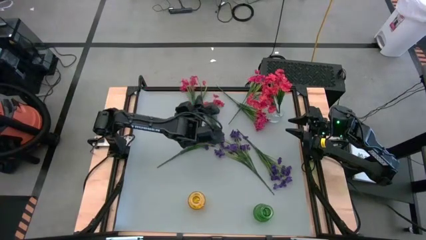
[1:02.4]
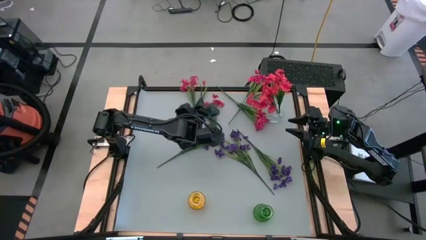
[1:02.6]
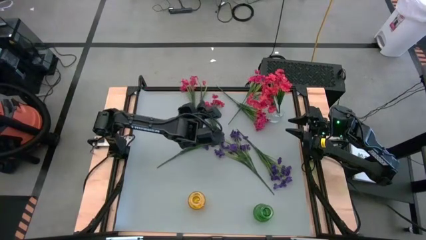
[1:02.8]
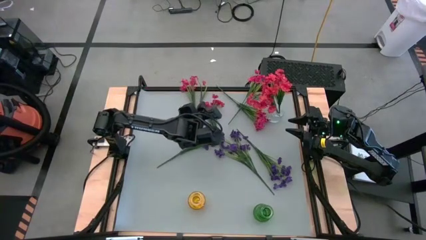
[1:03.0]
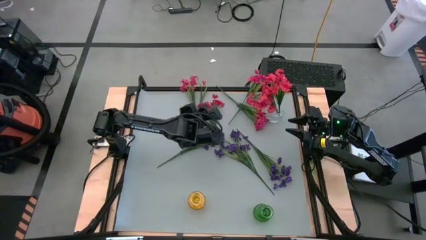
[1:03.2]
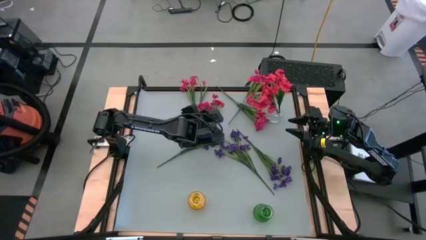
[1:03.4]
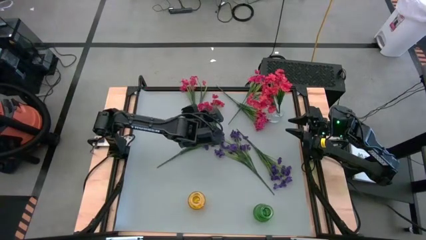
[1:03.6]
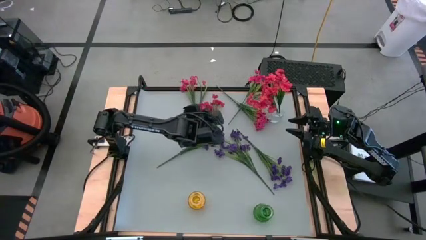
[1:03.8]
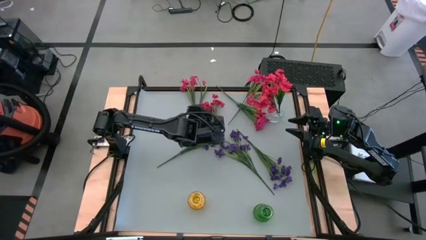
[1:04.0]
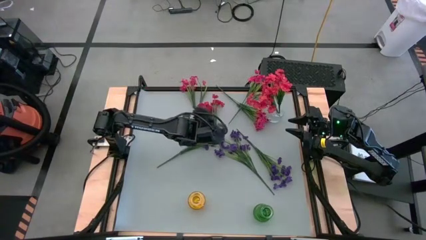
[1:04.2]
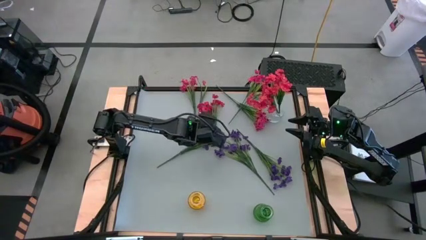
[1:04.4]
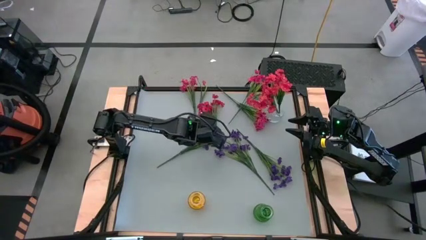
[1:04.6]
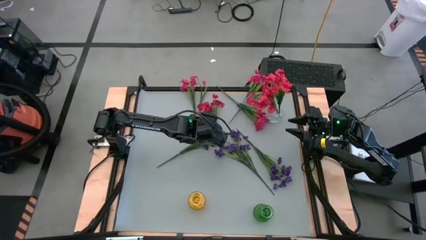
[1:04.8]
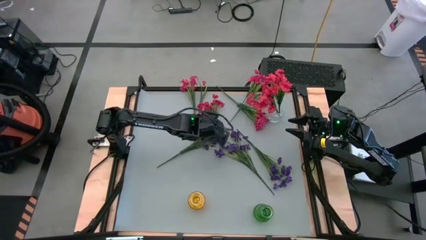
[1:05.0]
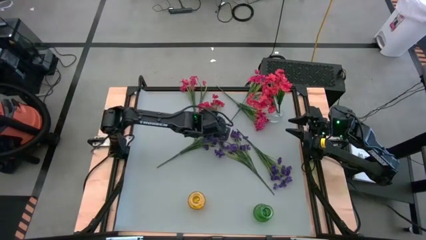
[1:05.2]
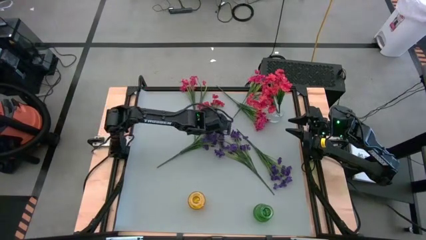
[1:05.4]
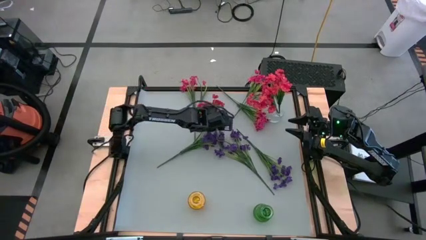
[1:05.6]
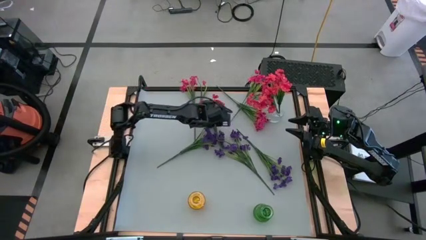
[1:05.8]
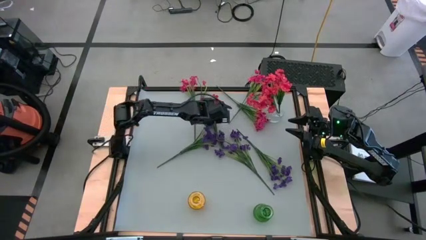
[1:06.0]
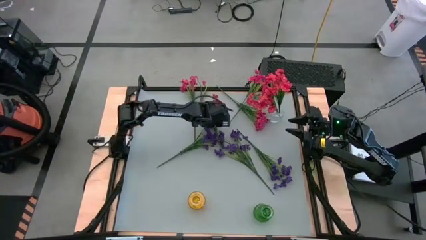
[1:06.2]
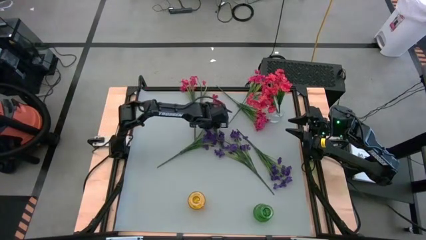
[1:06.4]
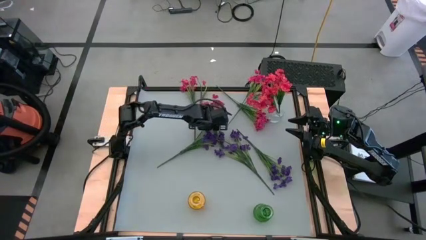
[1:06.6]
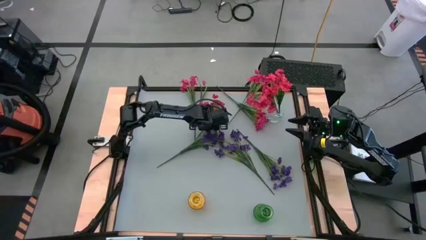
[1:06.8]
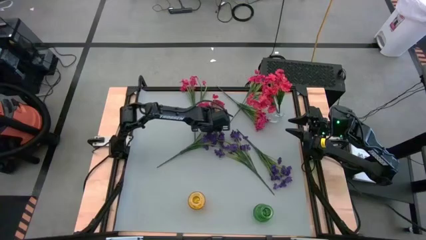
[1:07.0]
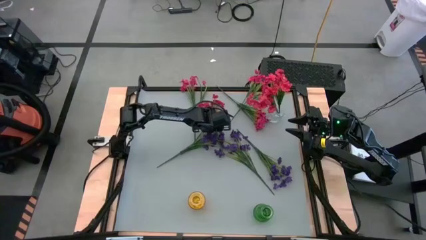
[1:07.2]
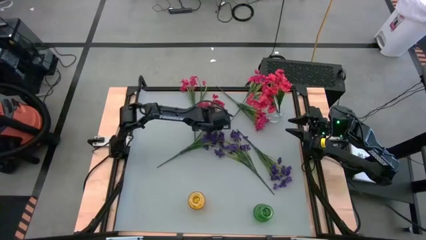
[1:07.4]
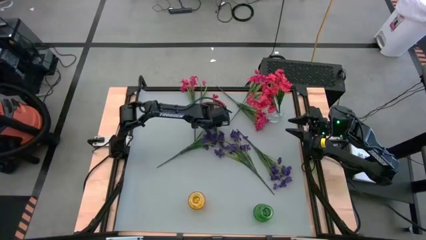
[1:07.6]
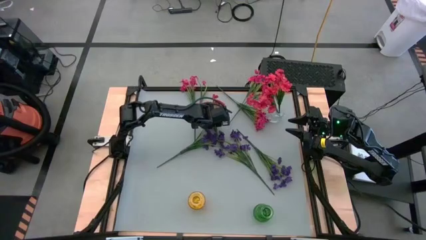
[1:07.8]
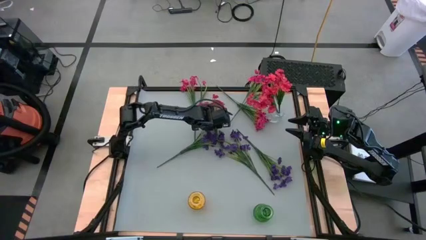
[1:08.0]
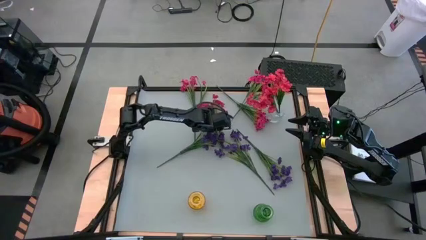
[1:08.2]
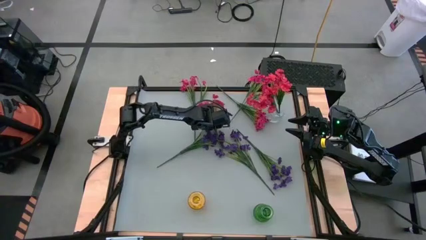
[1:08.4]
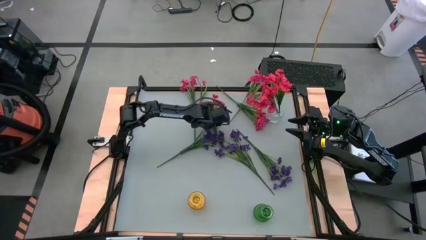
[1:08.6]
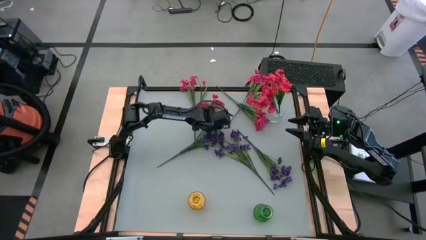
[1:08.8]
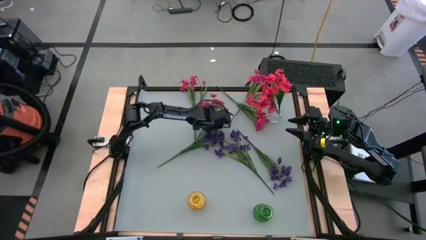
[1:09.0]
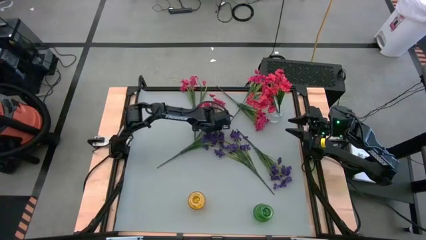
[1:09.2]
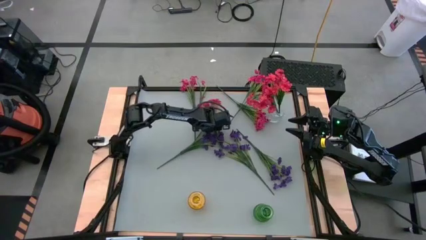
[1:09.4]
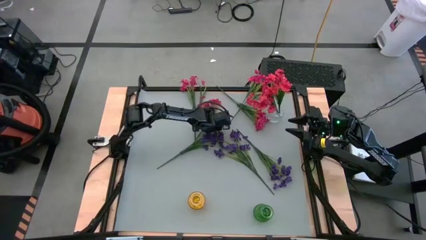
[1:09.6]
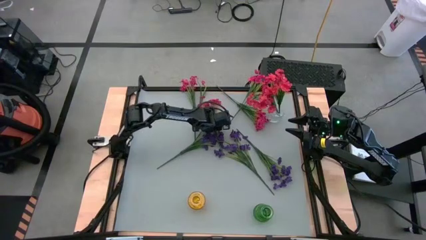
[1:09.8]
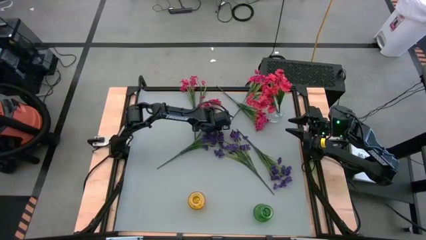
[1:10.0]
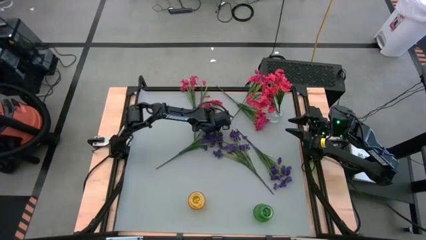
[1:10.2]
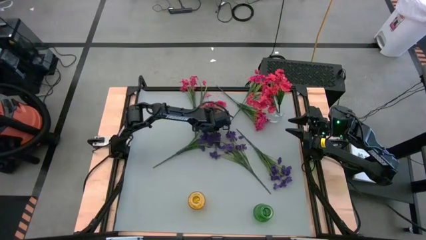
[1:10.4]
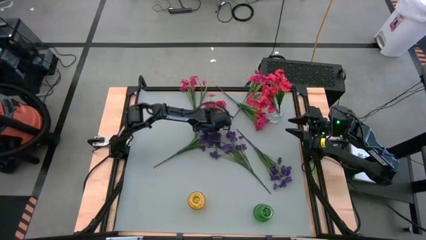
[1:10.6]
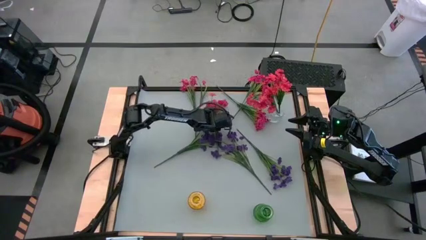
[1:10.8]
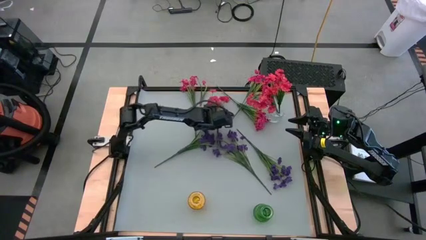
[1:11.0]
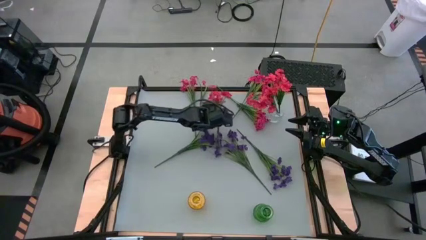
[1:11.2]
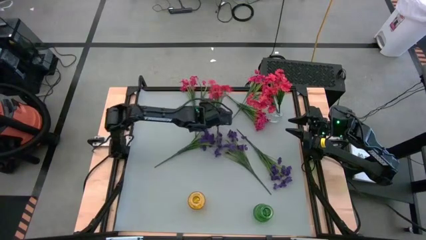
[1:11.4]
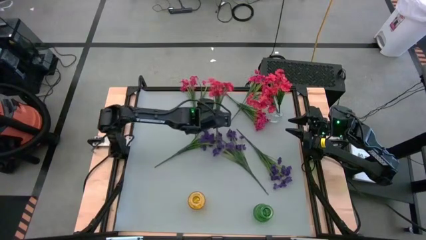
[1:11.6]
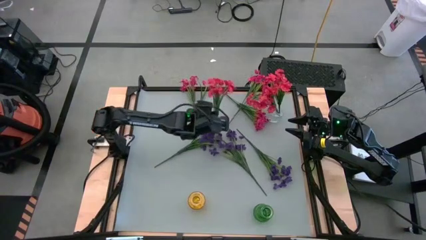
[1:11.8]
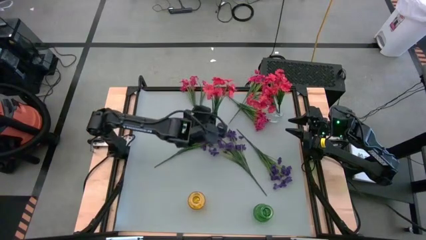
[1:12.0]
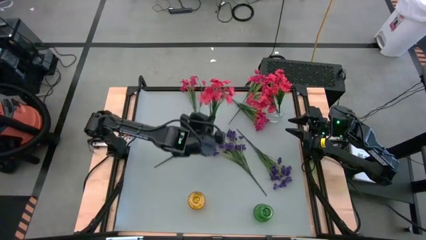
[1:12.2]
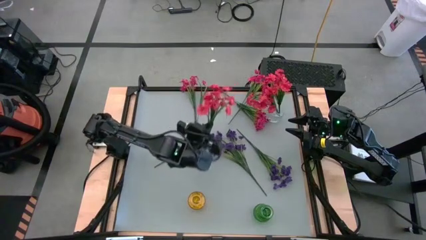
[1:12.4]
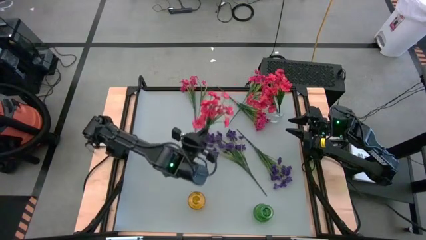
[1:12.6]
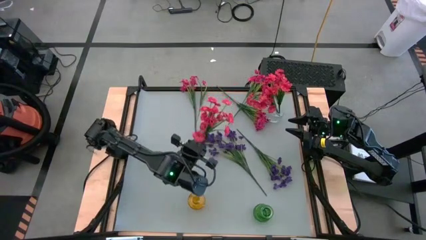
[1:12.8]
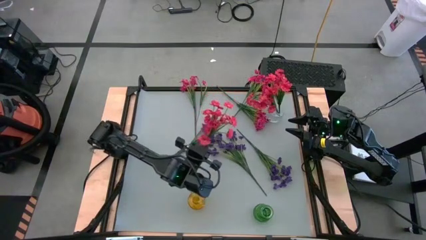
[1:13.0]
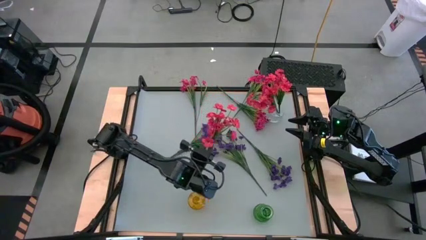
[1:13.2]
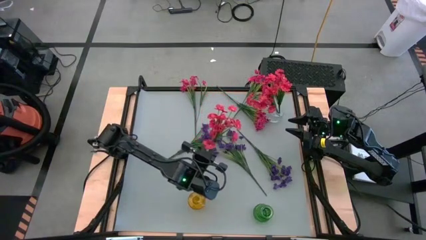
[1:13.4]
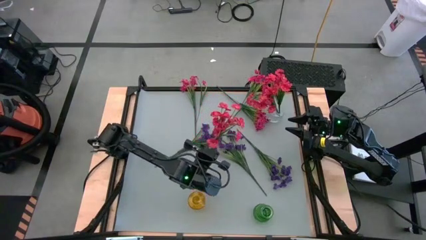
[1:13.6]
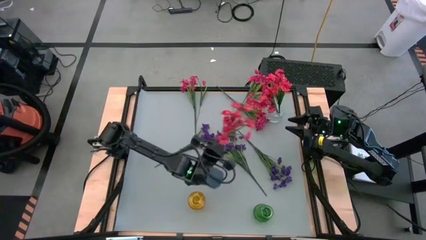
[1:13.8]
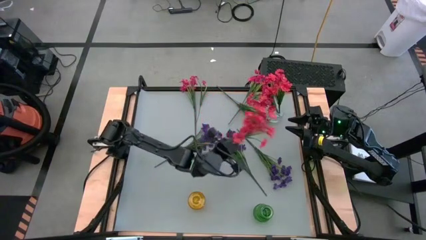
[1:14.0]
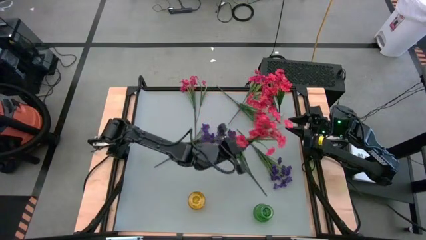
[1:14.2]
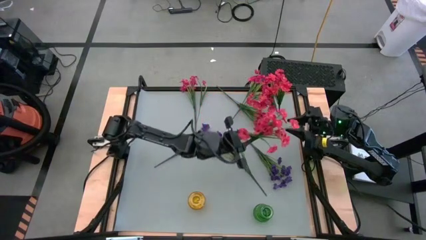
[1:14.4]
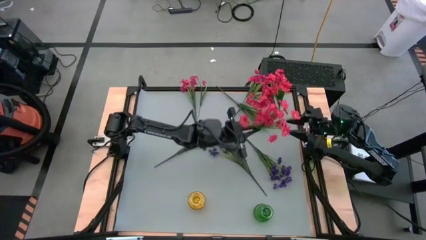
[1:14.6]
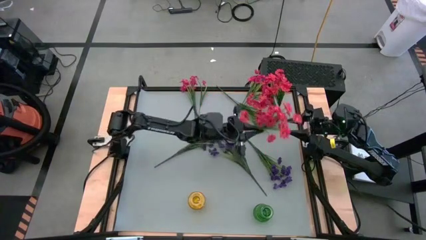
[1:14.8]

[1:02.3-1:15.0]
Task: Sort flowers into vase by color
Put the red flower into the transparent vase

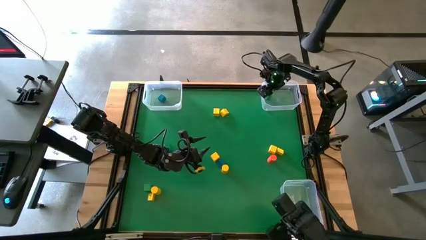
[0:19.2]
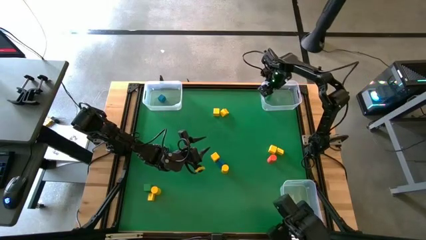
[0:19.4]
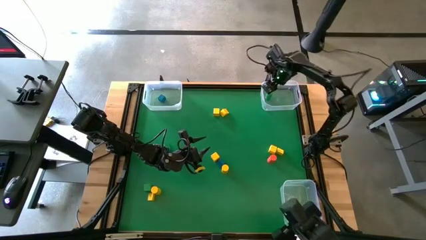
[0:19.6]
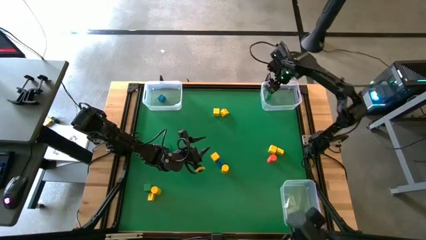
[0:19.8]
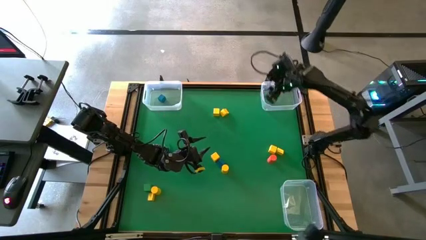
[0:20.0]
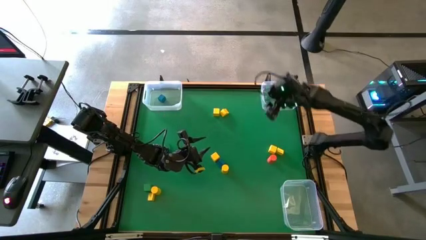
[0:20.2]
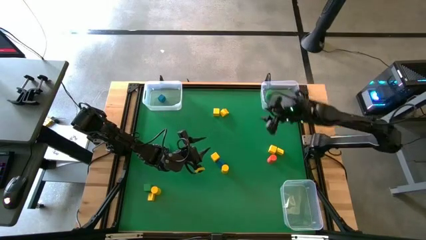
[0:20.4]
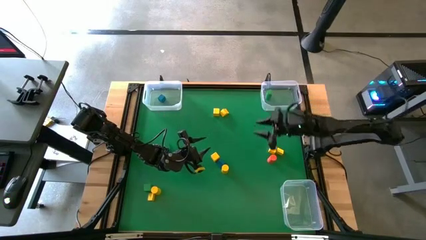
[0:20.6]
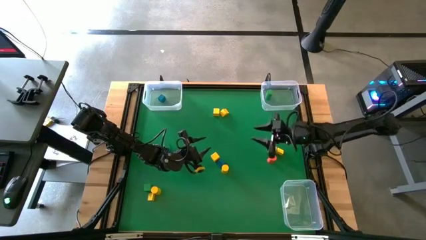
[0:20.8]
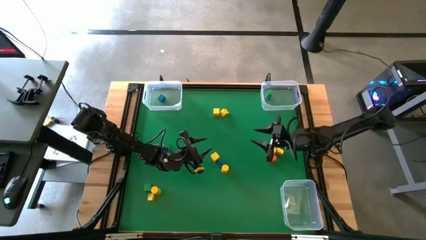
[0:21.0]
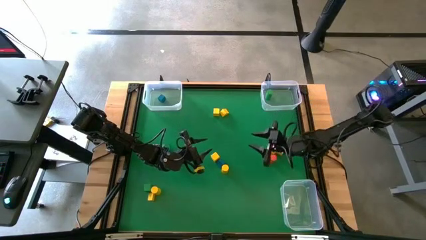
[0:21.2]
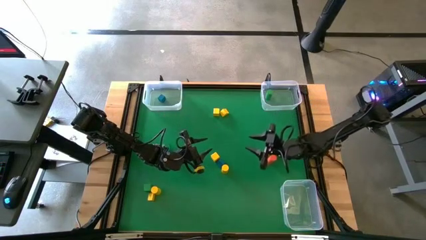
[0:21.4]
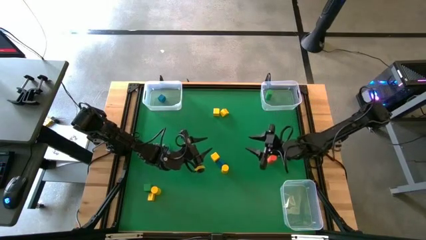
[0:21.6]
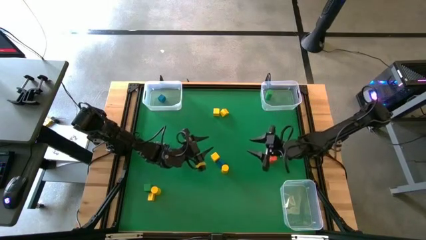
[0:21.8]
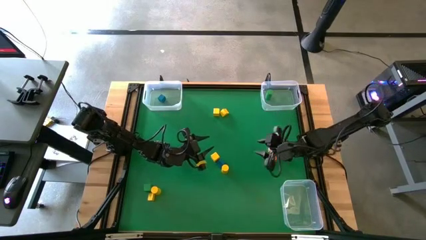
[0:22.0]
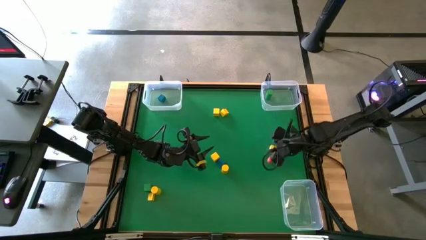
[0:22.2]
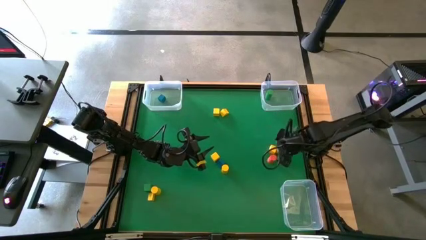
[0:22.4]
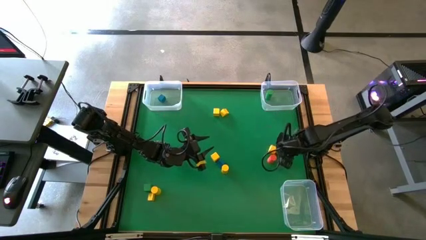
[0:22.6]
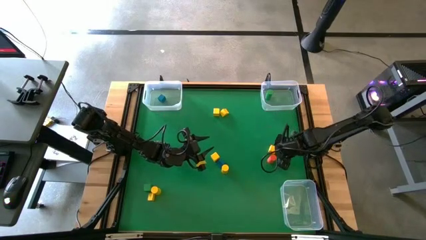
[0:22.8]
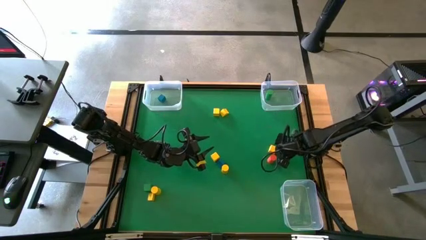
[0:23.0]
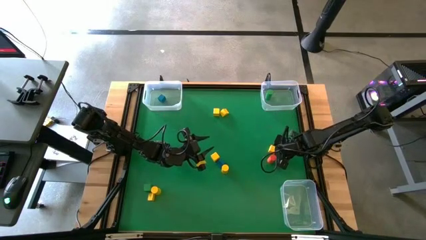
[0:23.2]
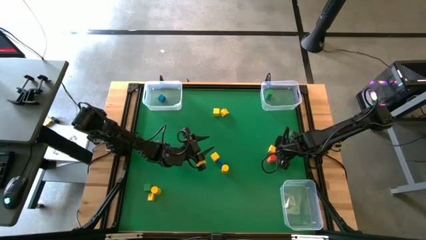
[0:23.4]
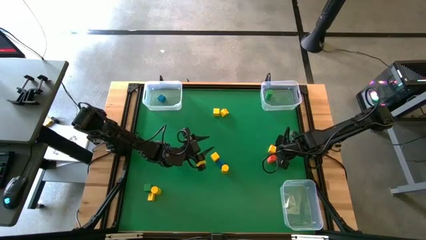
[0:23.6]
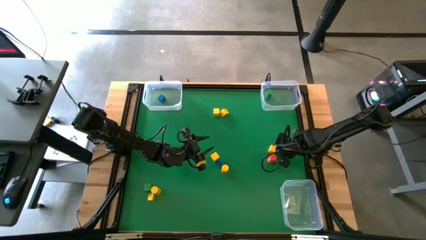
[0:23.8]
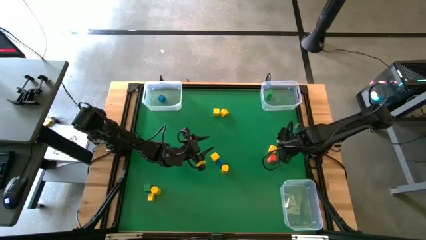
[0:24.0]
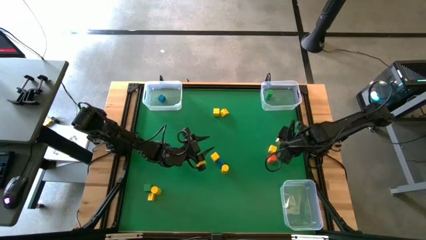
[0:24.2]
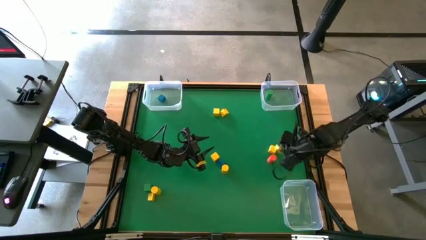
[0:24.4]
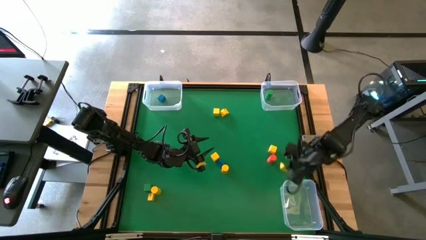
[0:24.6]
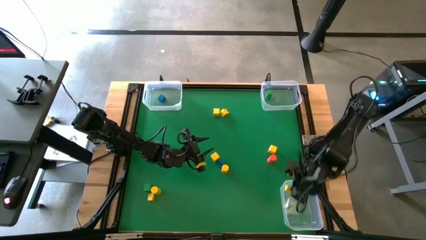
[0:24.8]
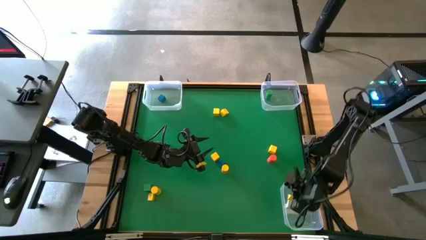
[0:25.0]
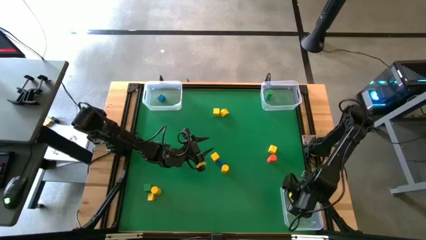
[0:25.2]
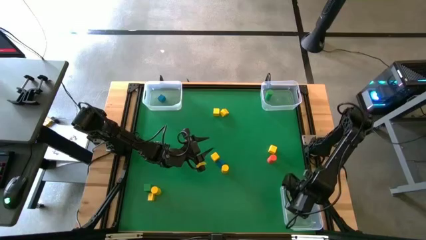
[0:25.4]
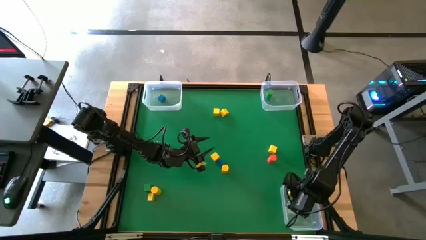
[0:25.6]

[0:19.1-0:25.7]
Task: Sort blocks by size
Put the yellow triangle block into the bottom transparent bin
